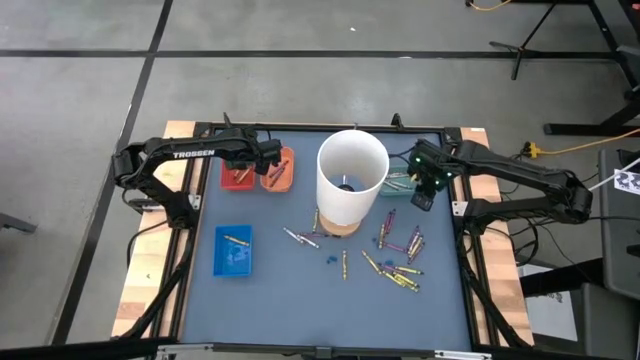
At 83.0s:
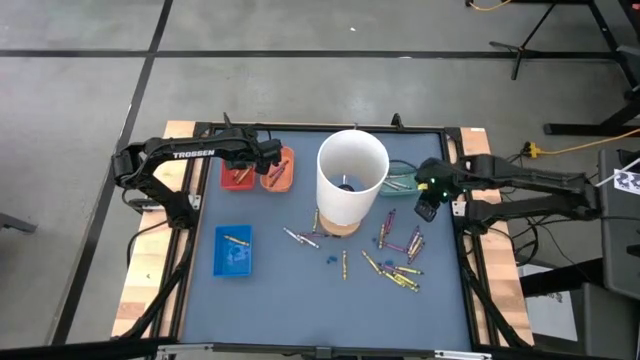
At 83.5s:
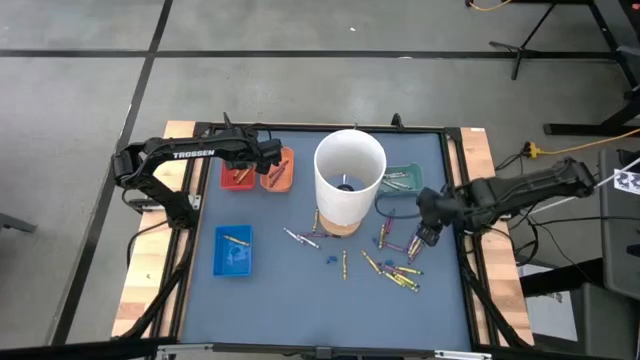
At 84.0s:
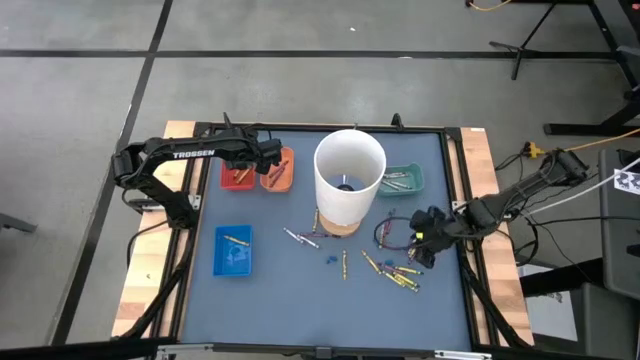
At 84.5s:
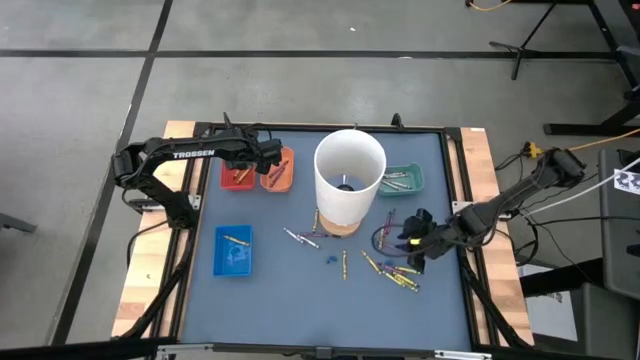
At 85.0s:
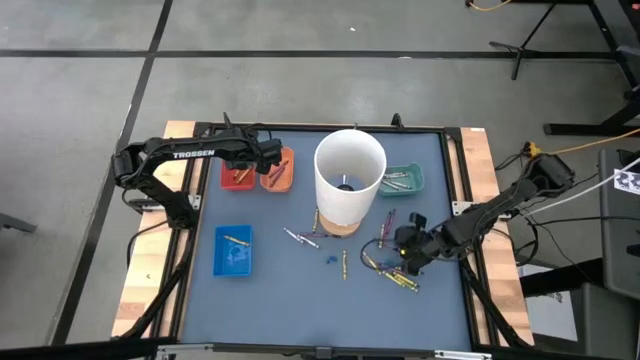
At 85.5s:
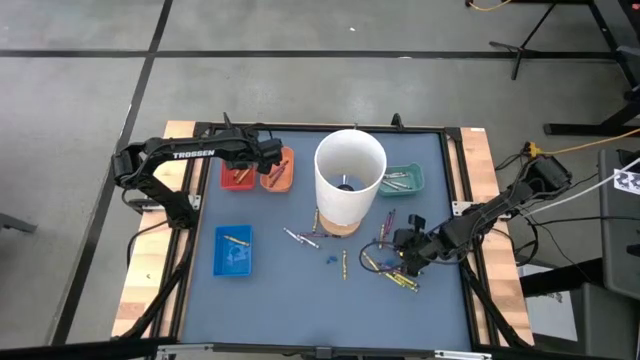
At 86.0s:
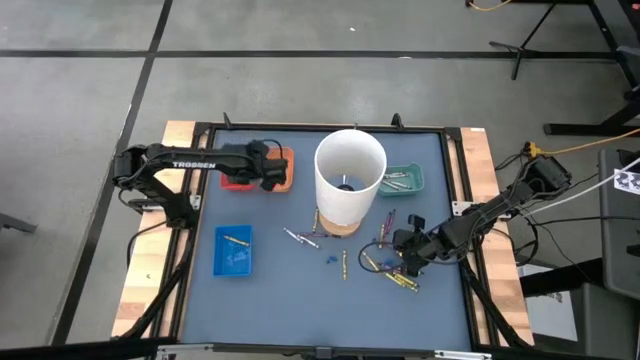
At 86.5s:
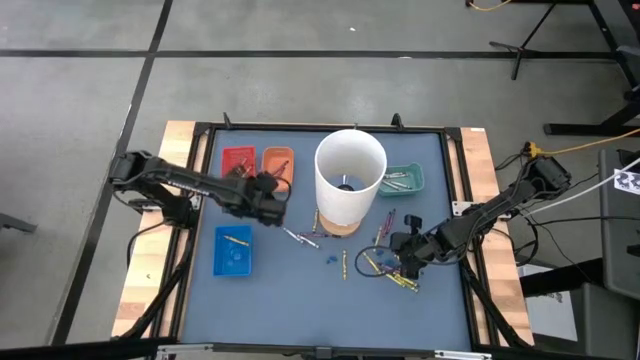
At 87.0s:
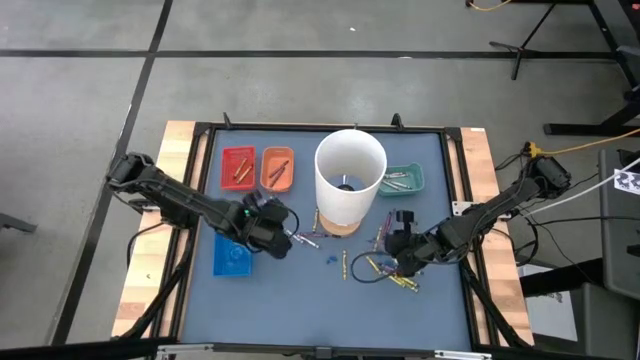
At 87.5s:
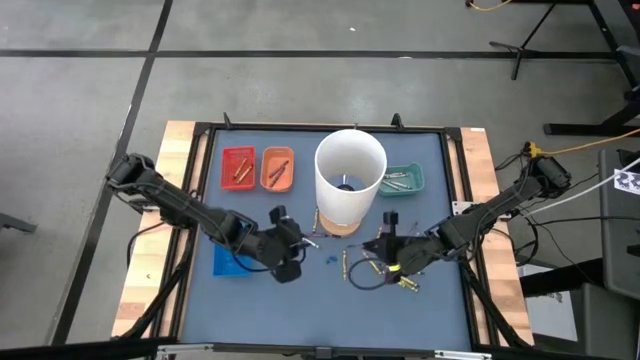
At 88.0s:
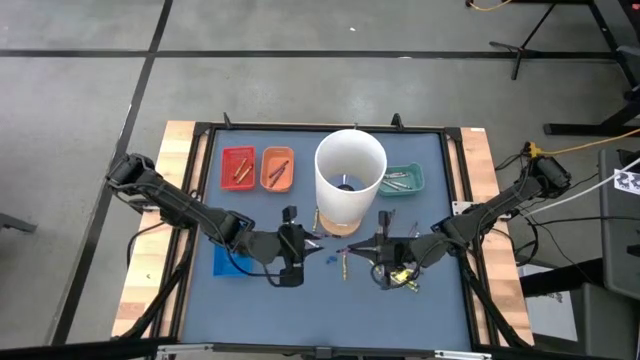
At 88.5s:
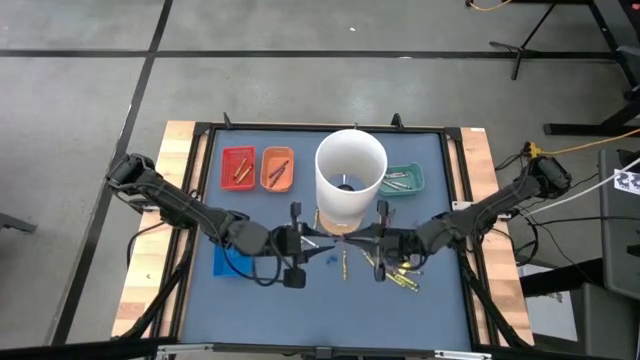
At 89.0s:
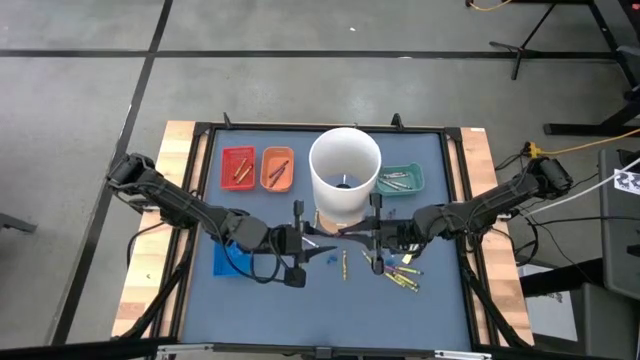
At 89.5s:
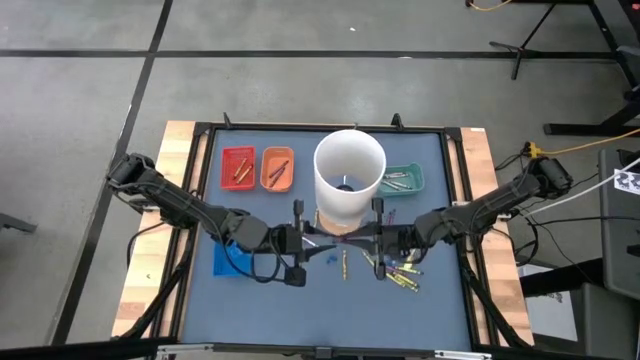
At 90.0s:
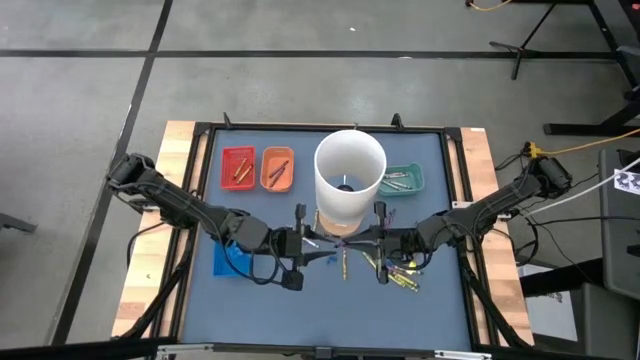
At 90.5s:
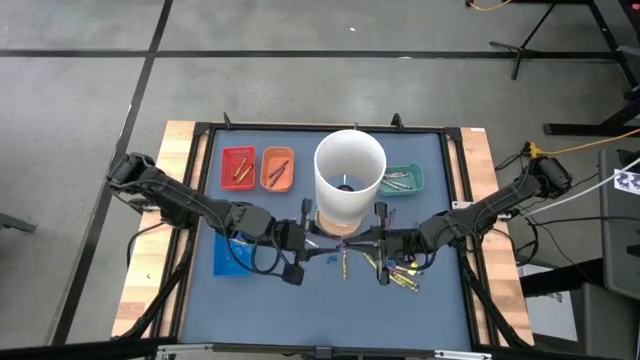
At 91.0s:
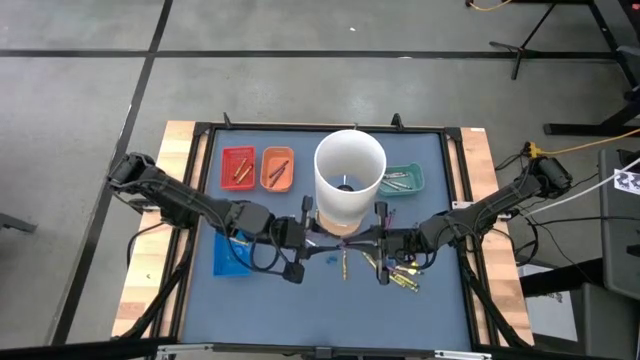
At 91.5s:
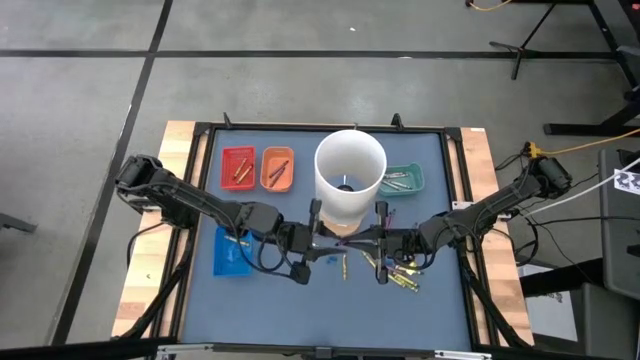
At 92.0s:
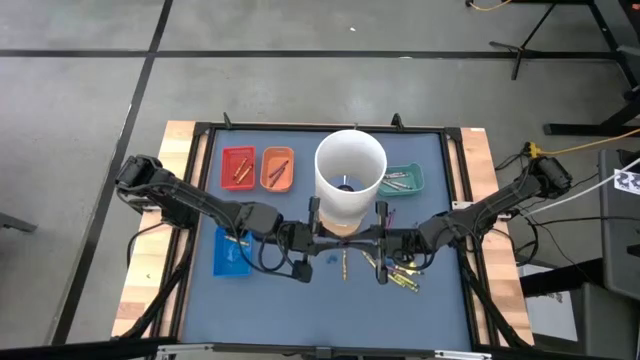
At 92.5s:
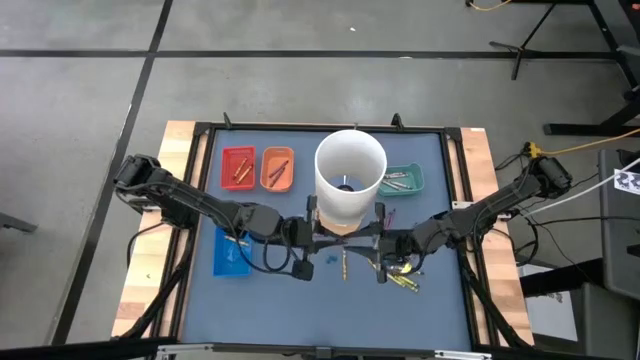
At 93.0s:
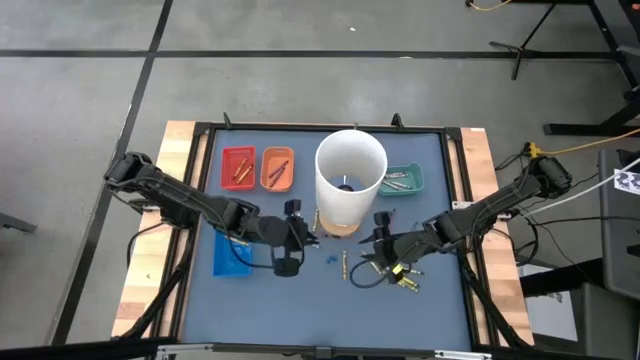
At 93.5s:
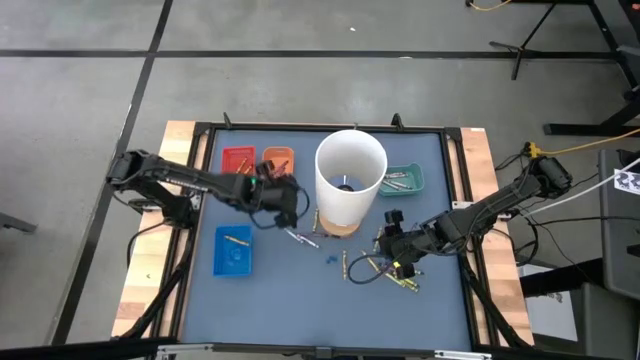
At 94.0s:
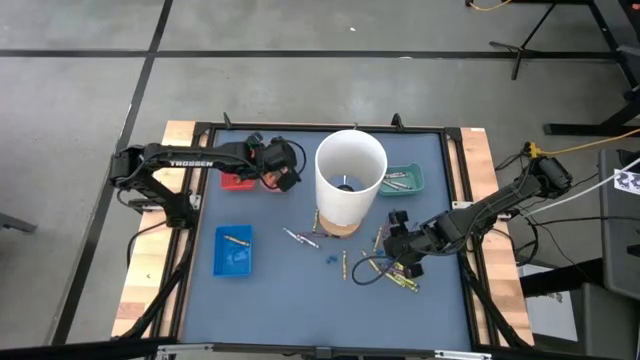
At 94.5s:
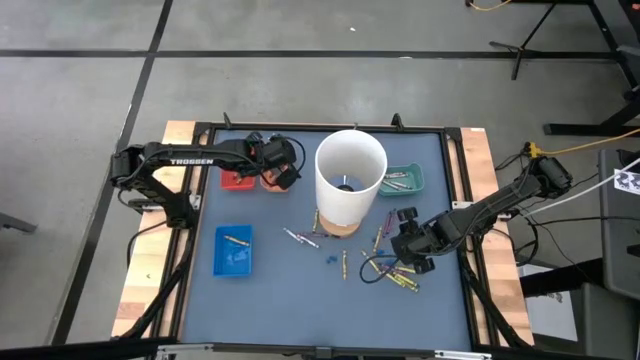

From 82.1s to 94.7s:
Task: Sort crayons
Put the violet crayon into the orange bin

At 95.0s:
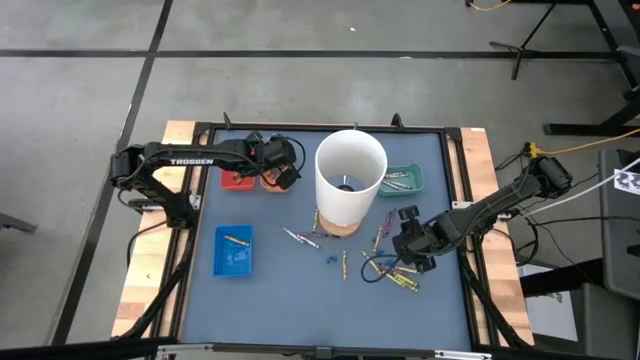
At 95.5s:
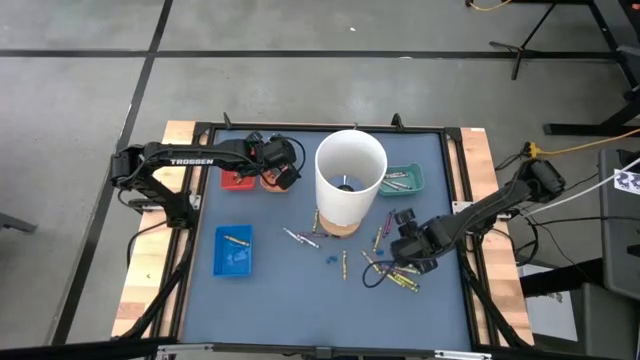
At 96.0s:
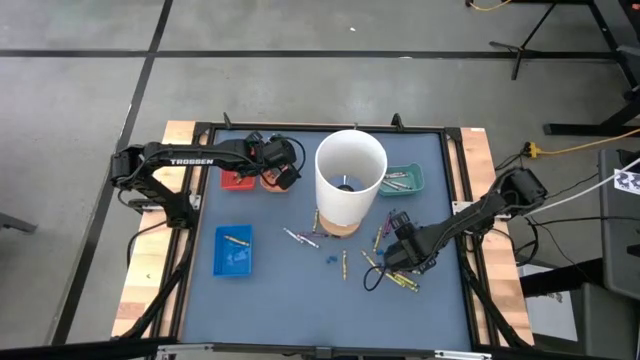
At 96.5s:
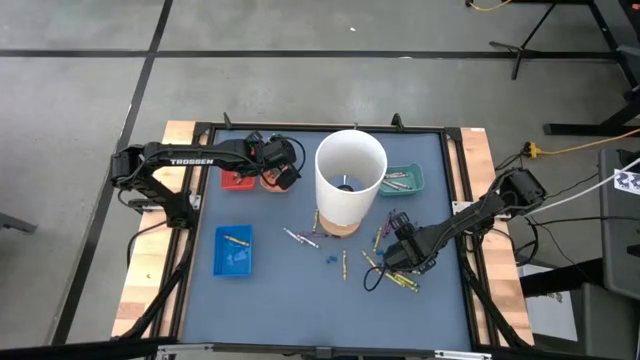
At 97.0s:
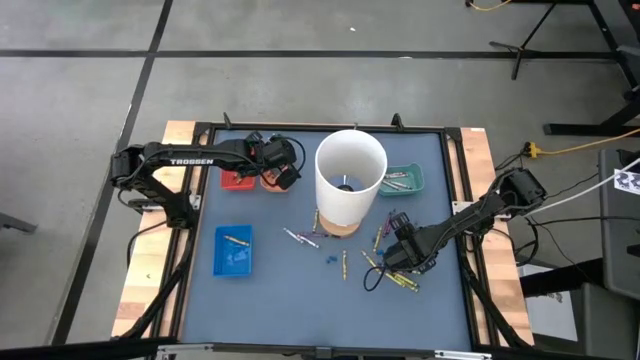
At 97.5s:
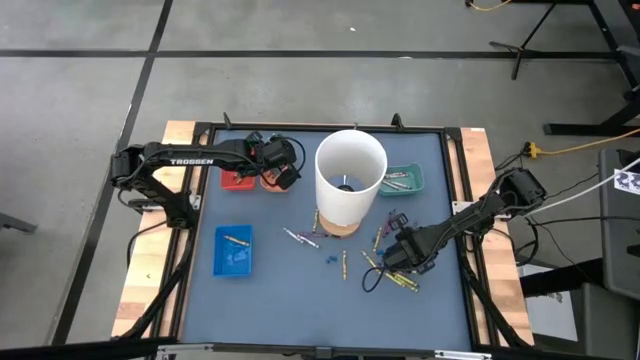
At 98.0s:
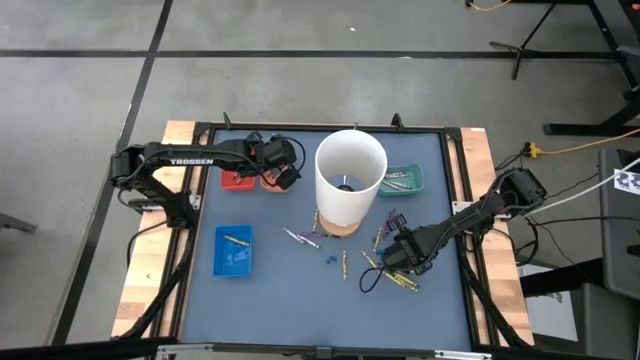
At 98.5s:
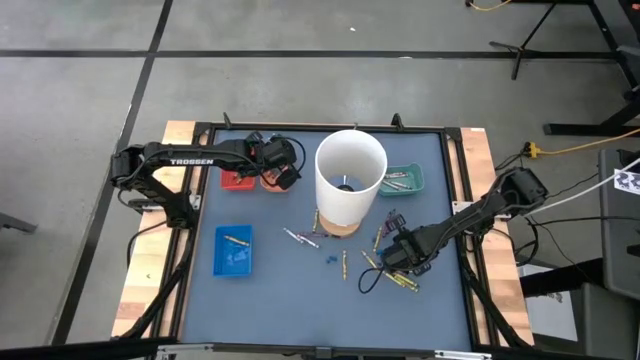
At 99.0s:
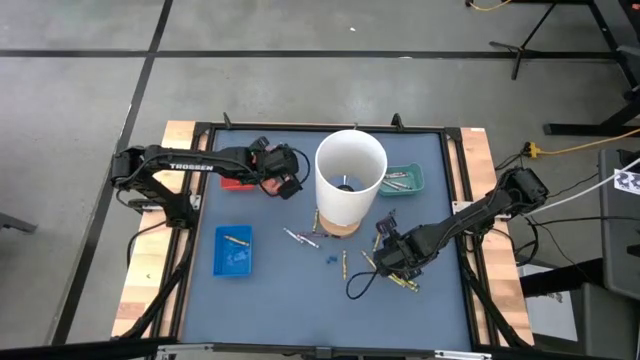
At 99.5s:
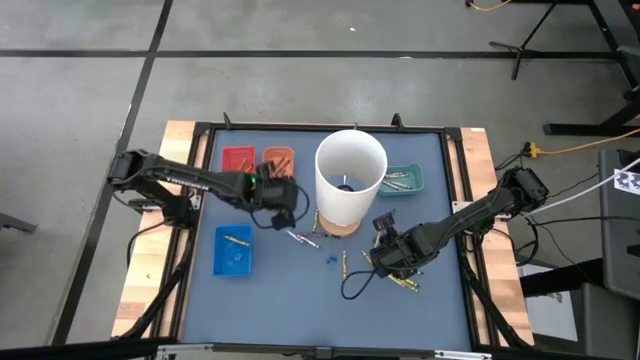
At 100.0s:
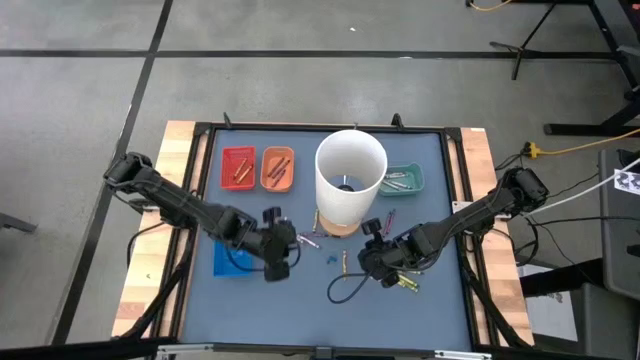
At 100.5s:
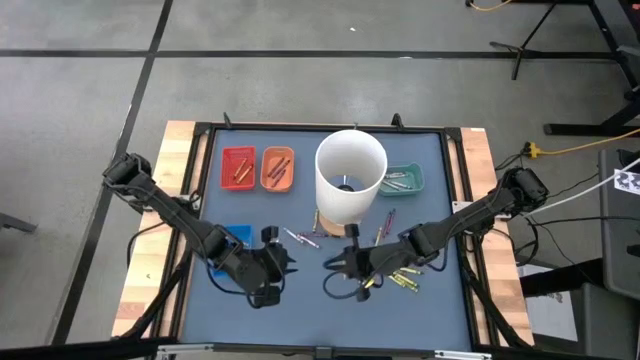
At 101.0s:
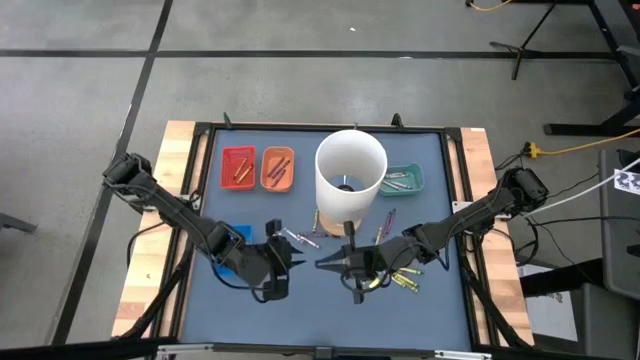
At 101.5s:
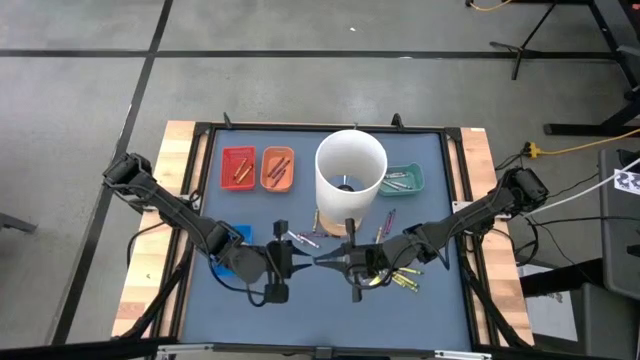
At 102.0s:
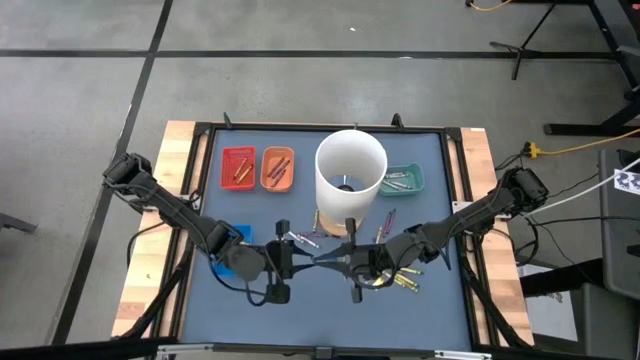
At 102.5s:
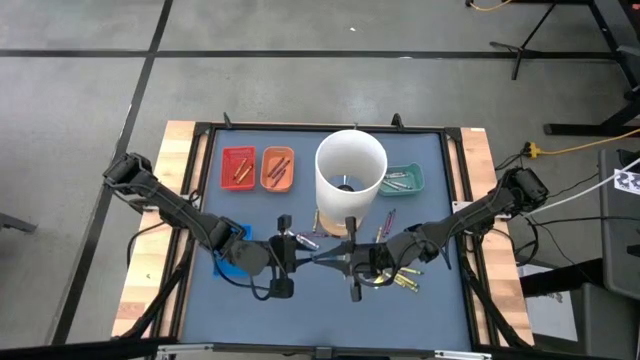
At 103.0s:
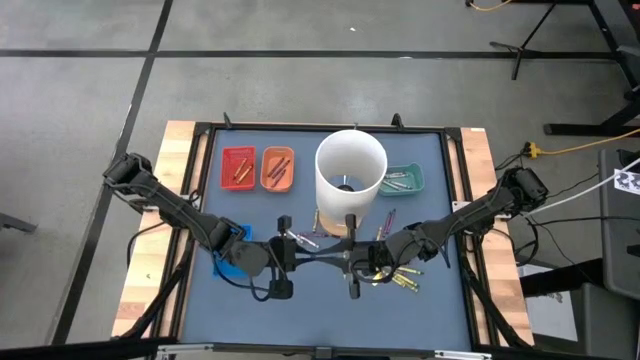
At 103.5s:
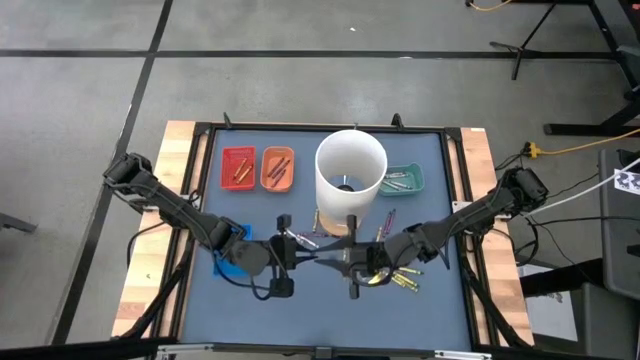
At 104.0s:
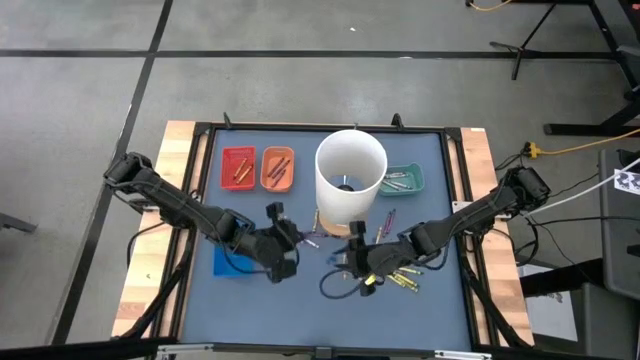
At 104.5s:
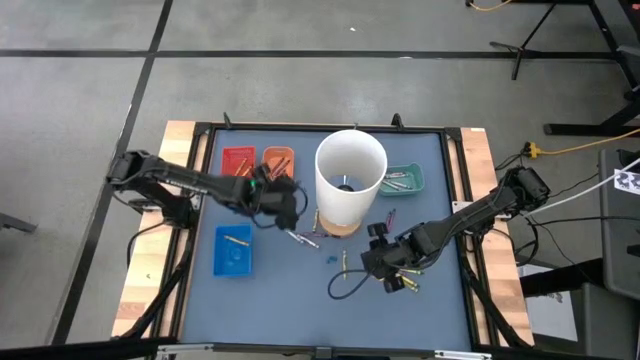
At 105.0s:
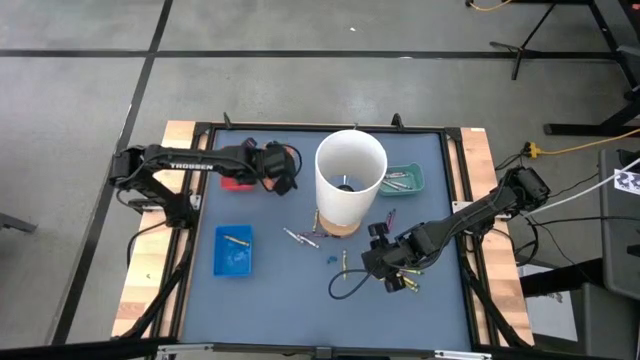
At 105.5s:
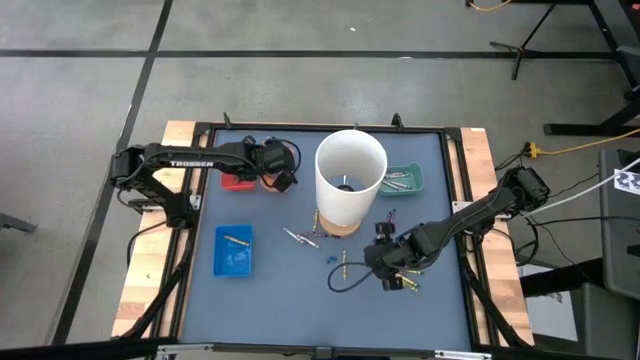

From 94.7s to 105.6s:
Put the violet crayon into the orange bin
